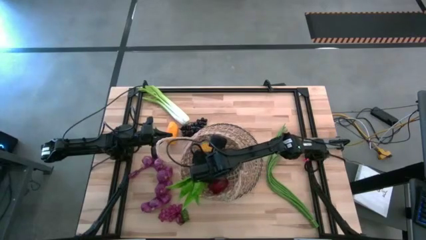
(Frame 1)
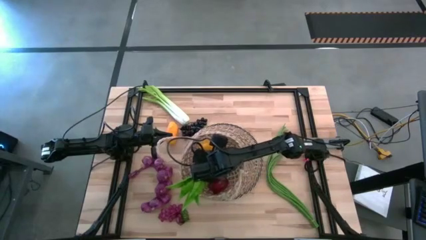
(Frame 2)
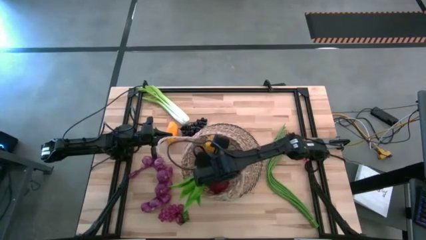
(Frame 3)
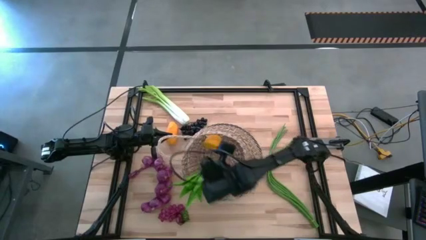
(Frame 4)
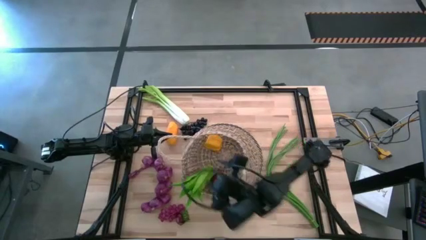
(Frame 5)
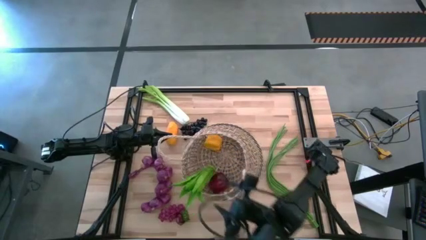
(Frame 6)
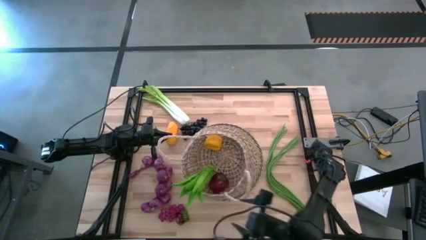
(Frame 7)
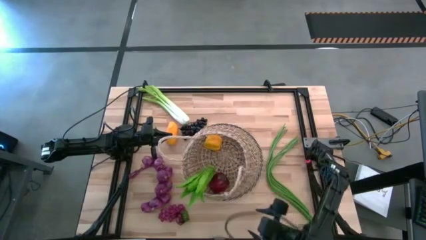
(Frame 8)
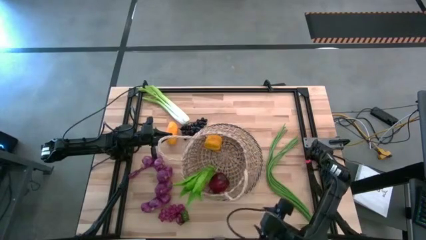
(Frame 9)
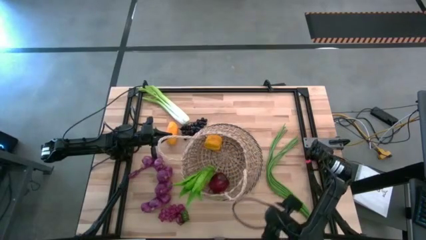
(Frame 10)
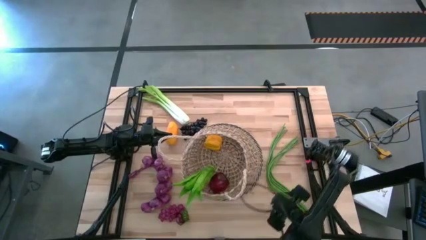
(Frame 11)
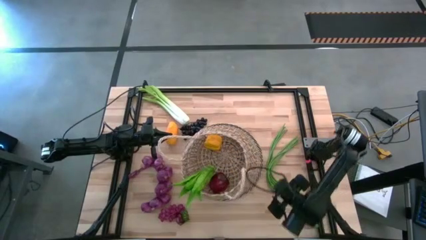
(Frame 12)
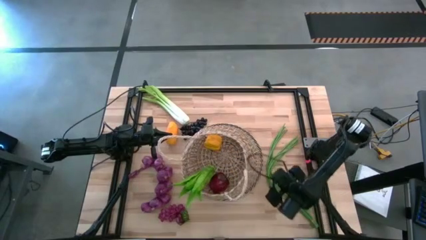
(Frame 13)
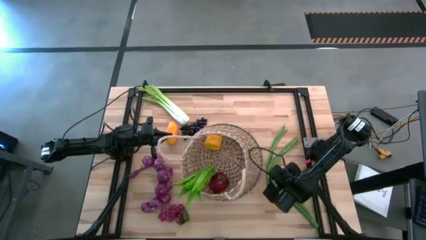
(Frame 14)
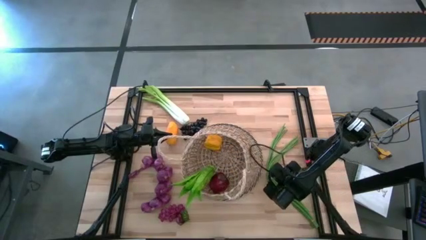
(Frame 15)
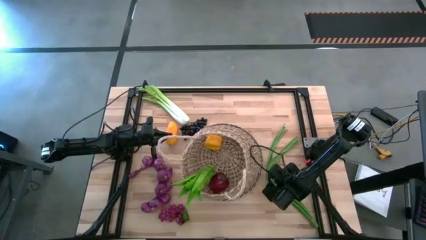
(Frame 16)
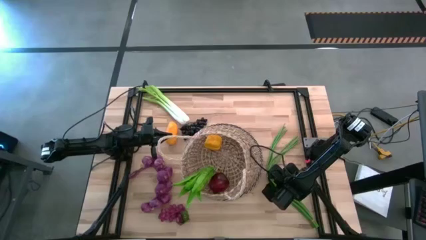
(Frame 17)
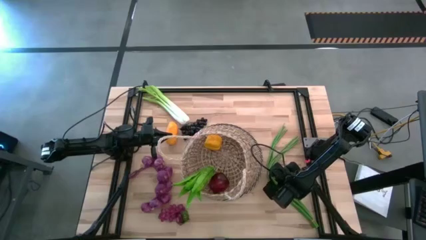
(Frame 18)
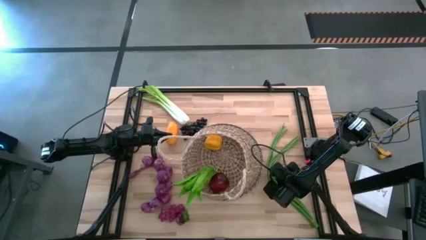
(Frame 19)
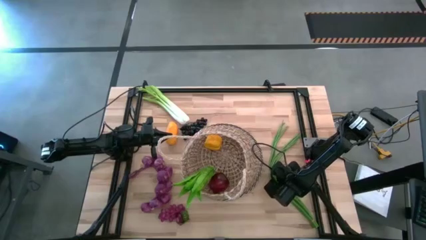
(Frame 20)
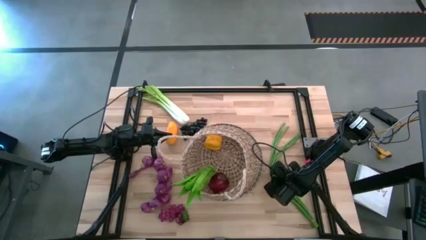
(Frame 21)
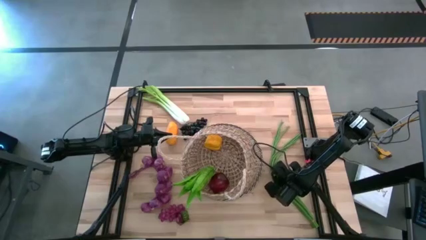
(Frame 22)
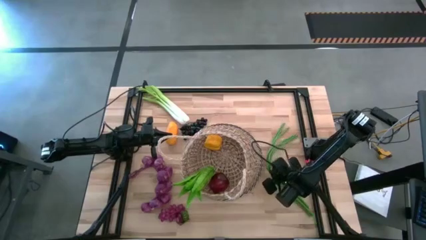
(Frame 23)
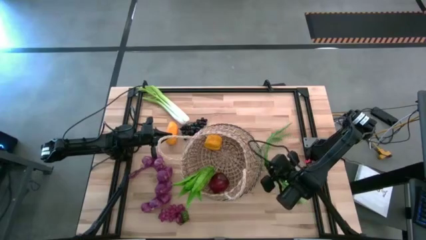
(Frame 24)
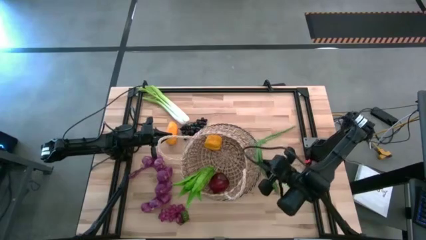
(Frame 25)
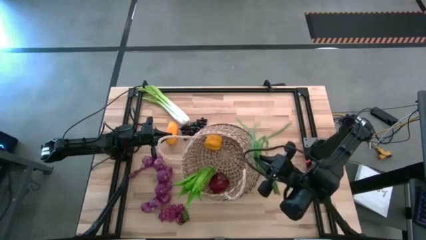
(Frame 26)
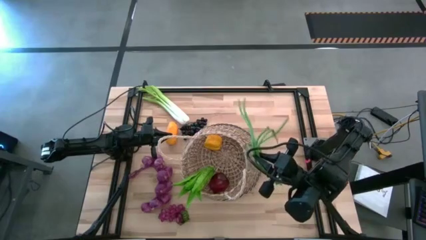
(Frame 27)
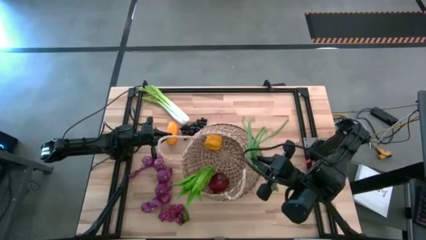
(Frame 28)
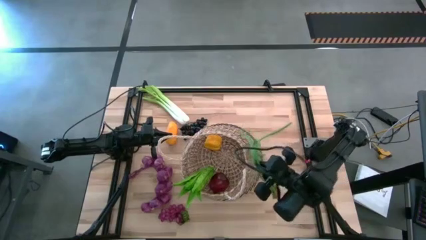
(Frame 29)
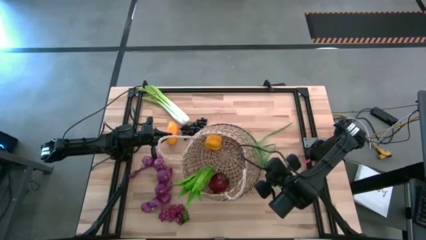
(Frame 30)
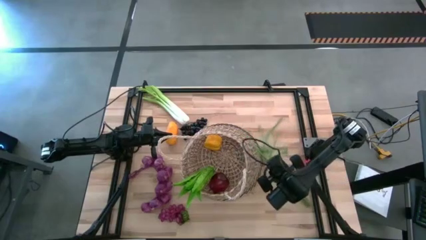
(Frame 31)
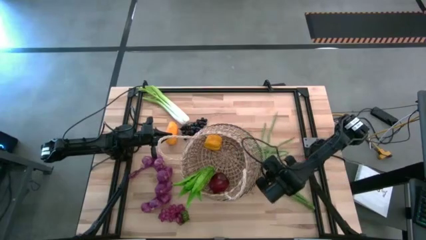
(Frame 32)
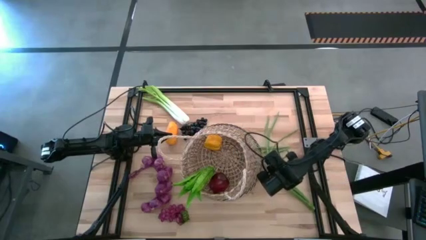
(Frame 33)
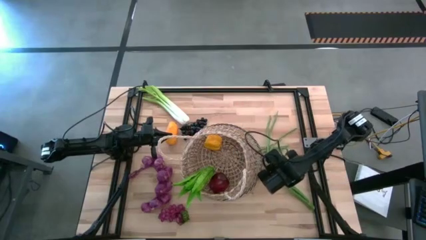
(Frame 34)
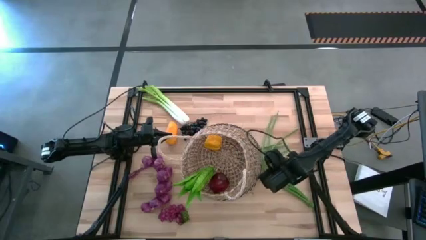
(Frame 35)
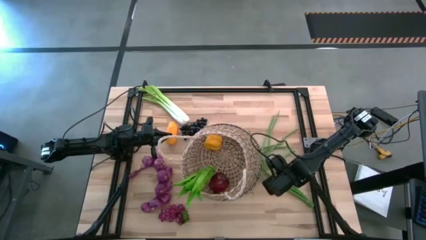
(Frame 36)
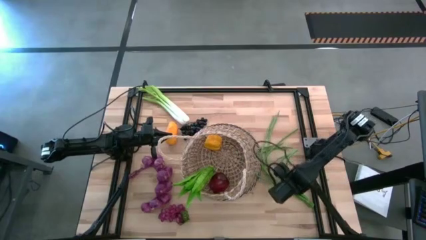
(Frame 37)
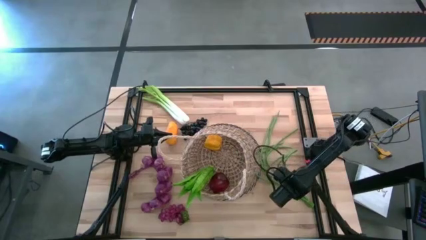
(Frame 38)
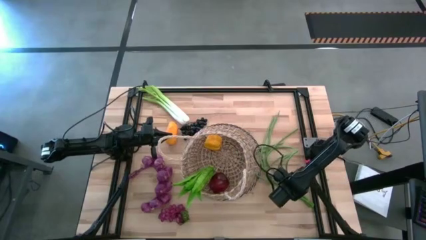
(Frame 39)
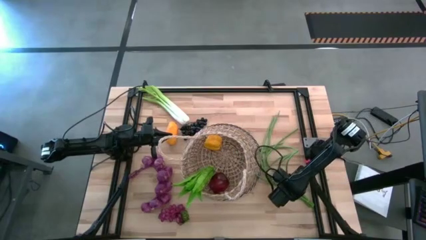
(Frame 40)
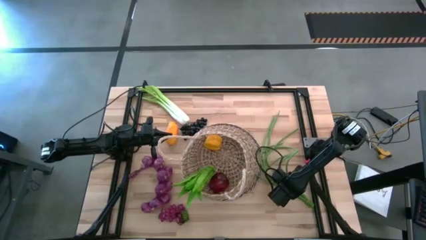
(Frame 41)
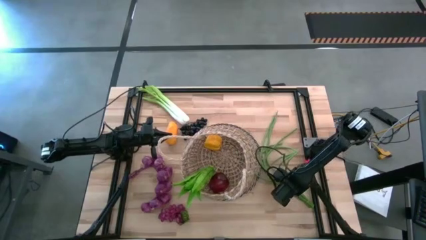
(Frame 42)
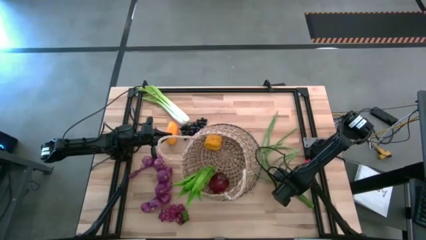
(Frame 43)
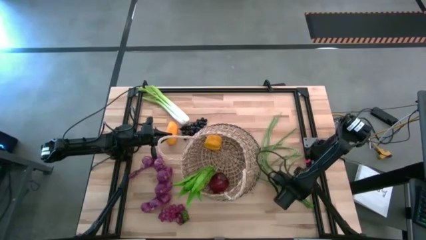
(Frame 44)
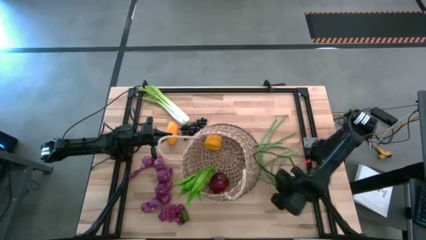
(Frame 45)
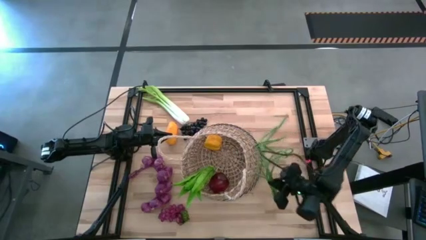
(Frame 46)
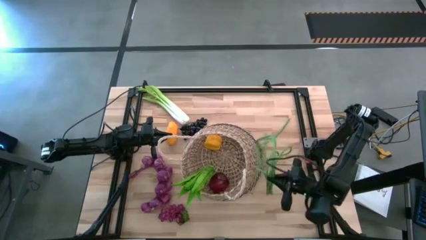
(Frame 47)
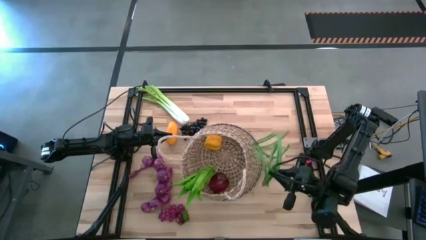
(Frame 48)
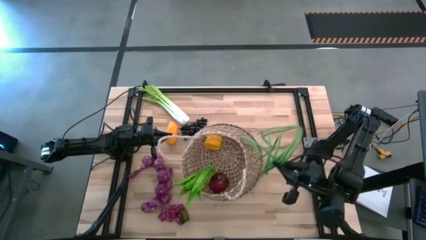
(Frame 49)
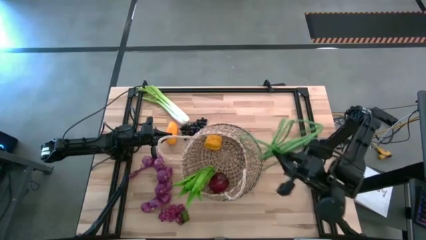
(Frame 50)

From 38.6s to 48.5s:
Task: Build produce basket
Put the string beans into the basket

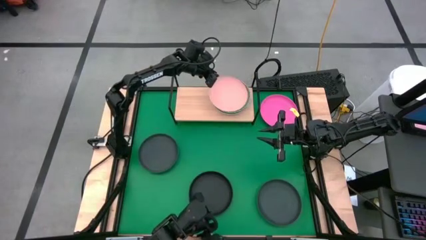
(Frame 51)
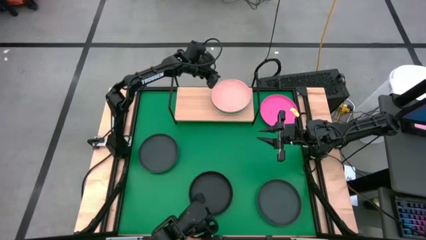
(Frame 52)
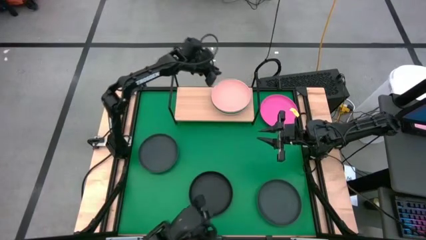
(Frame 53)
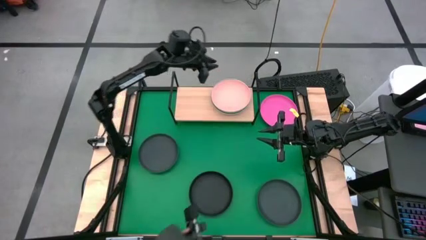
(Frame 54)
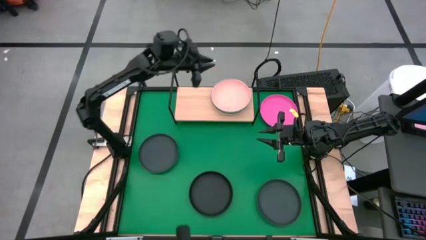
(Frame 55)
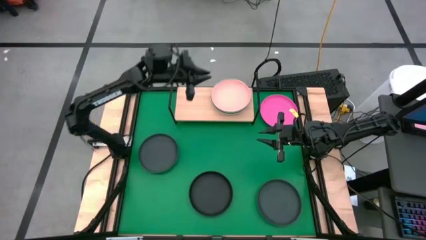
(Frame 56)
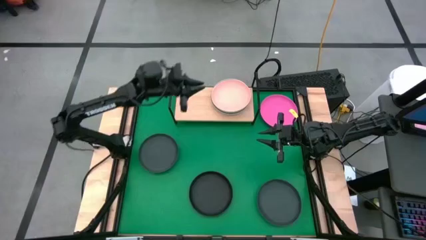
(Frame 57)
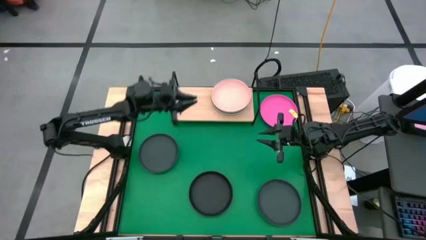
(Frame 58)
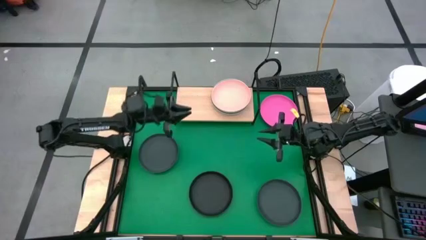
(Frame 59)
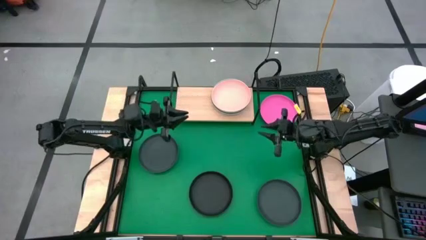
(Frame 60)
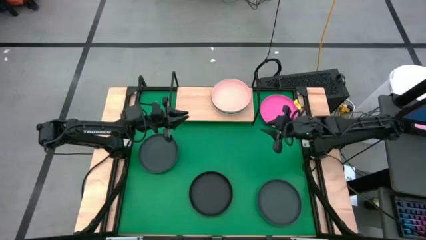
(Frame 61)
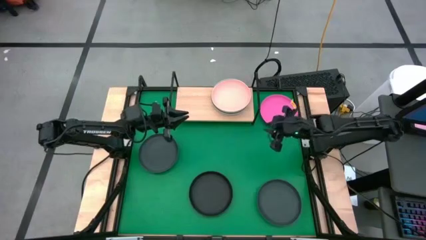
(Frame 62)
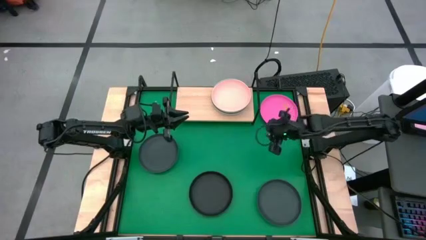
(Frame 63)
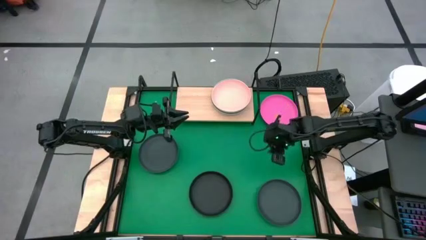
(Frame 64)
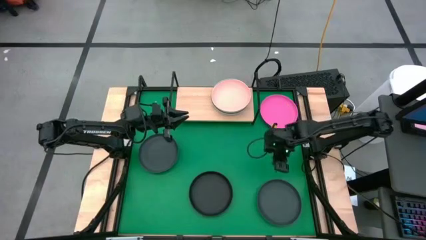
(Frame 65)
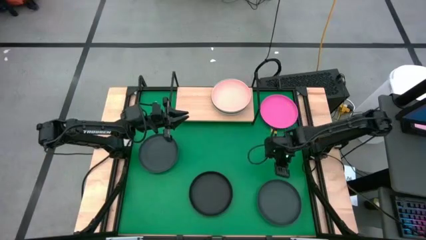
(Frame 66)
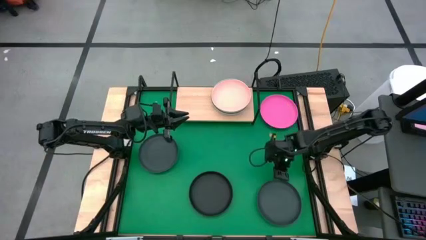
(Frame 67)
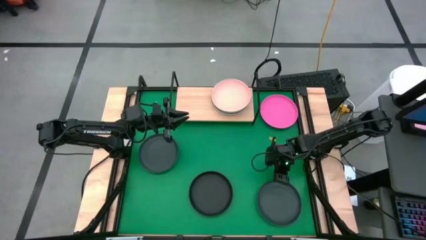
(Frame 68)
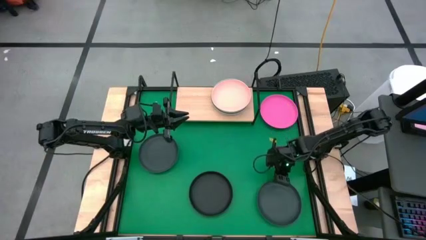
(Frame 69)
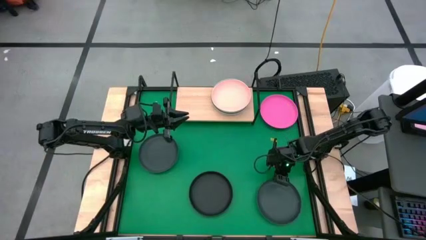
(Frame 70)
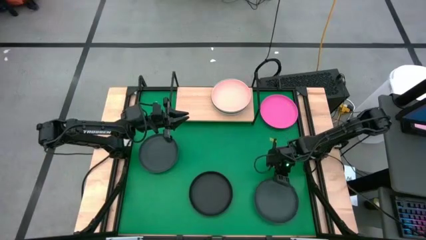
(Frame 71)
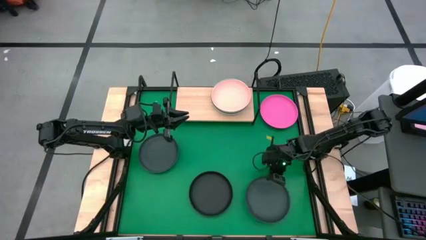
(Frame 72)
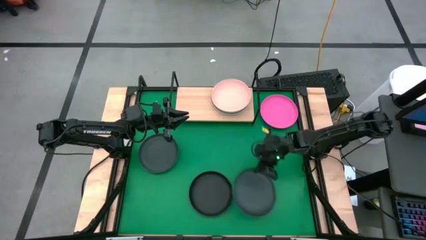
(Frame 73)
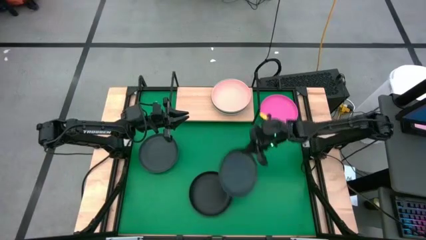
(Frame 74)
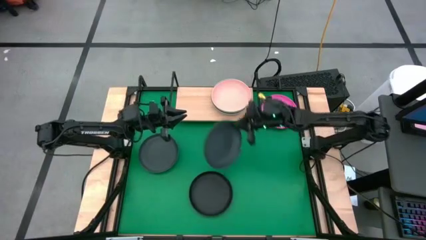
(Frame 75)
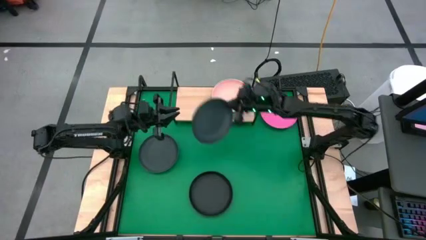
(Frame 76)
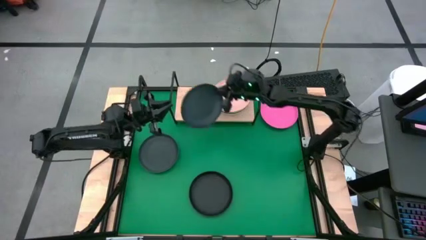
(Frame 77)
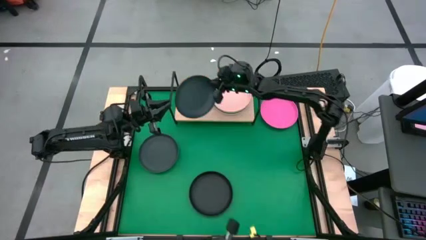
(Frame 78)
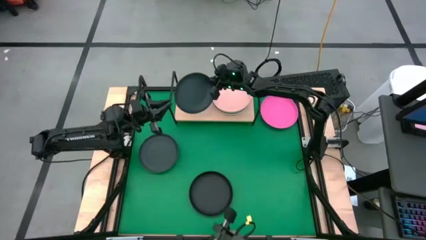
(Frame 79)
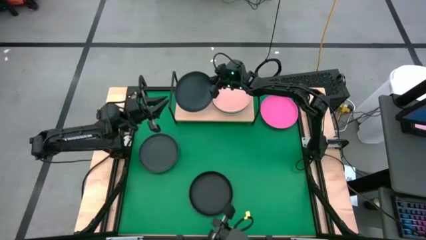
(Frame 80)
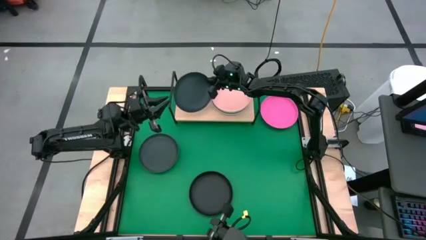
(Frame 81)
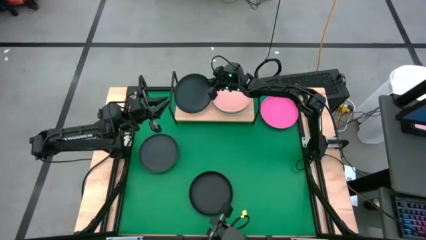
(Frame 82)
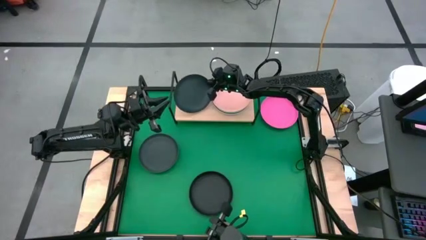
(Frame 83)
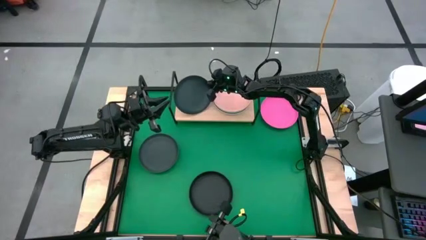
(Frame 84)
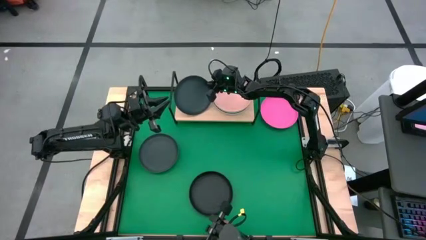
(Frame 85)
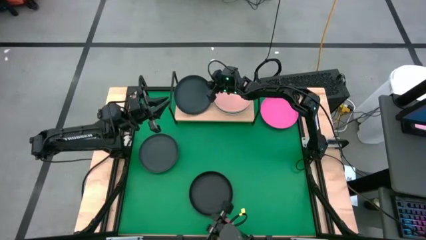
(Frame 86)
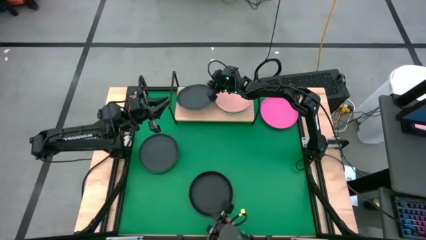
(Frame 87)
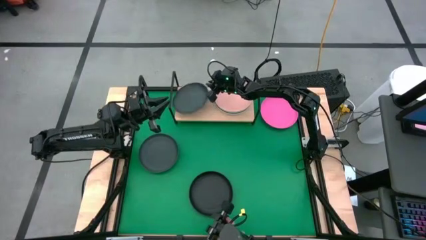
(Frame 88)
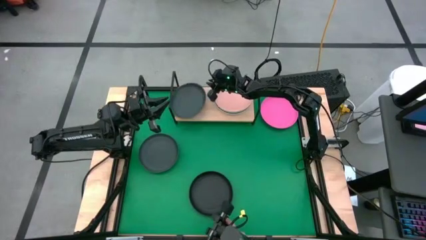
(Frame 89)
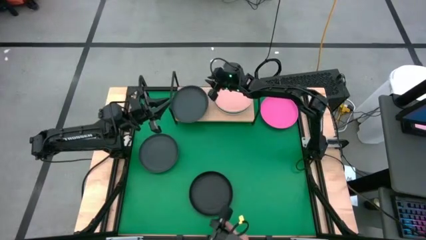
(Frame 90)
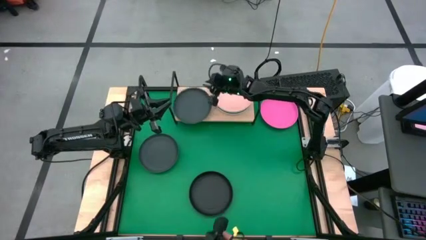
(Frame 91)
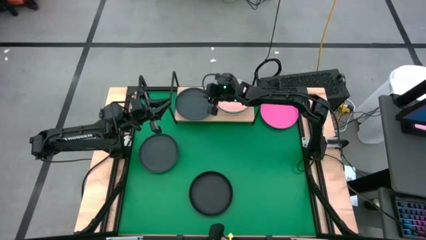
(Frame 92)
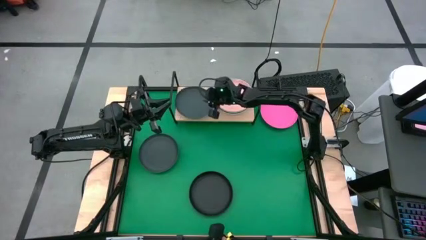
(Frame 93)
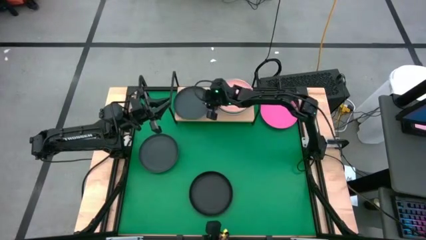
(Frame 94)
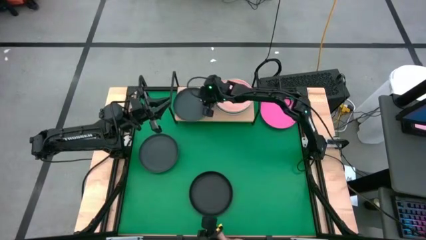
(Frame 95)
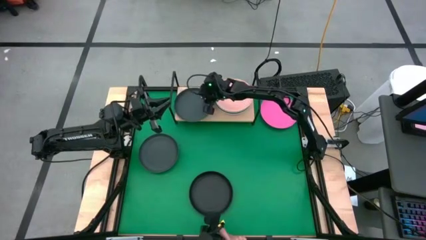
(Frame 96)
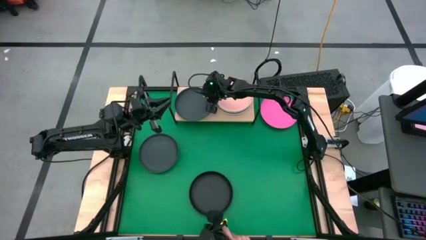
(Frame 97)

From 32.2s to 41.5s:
Task: Place and stack plates onto a shelf
Put the right black plate on the shelf
